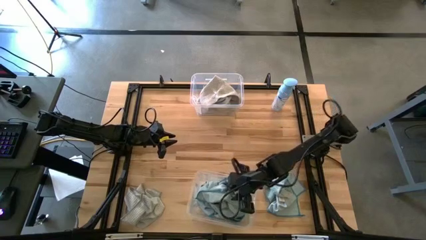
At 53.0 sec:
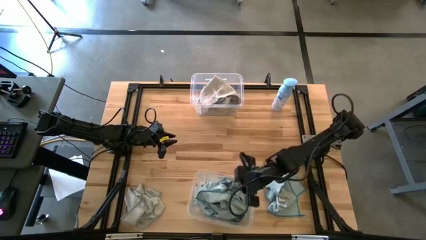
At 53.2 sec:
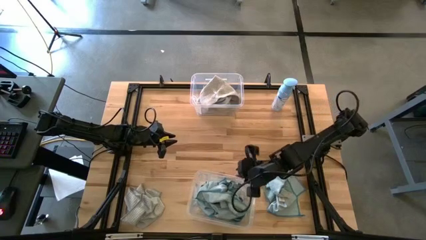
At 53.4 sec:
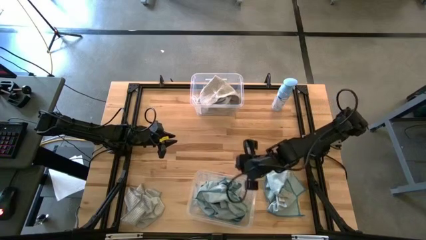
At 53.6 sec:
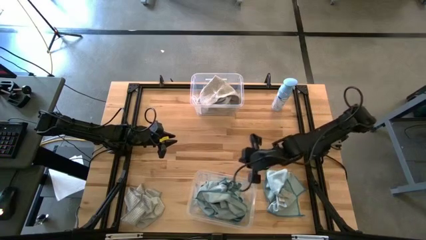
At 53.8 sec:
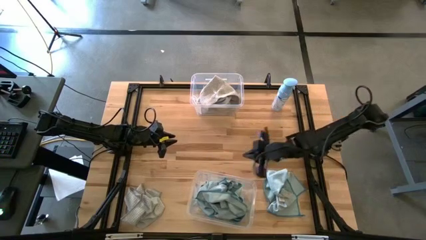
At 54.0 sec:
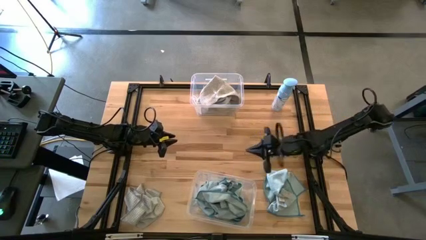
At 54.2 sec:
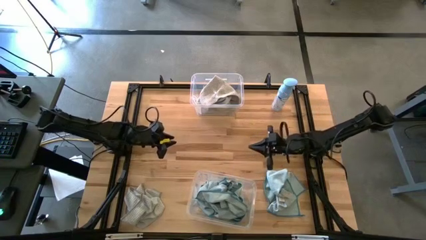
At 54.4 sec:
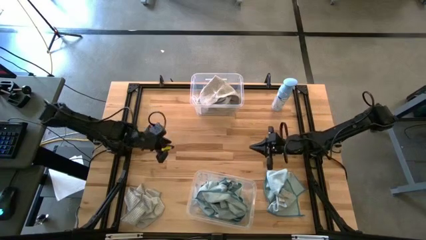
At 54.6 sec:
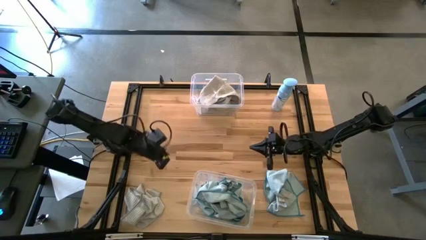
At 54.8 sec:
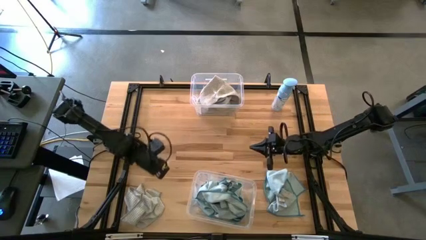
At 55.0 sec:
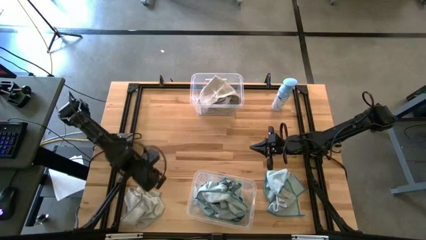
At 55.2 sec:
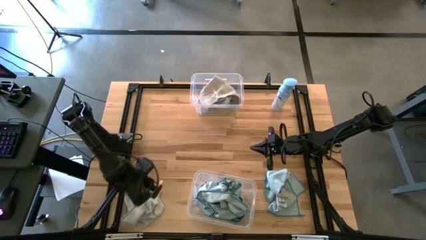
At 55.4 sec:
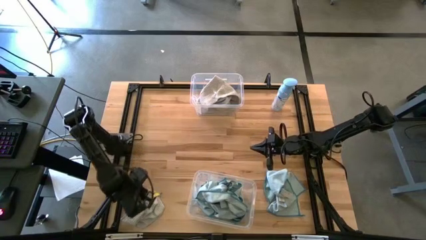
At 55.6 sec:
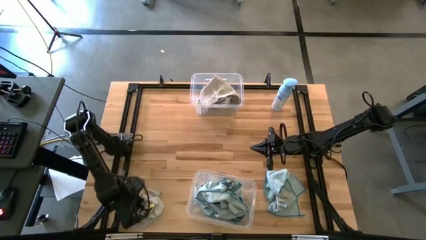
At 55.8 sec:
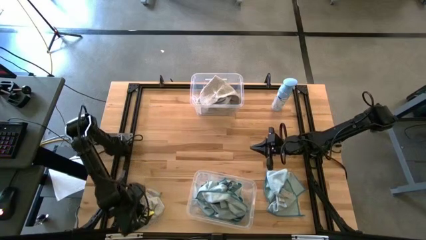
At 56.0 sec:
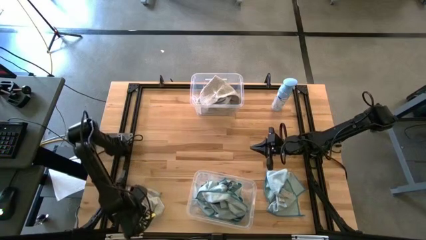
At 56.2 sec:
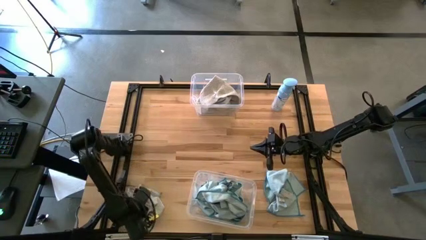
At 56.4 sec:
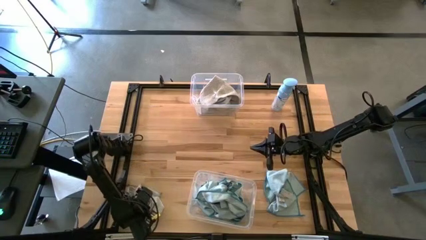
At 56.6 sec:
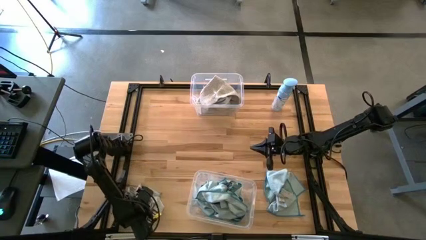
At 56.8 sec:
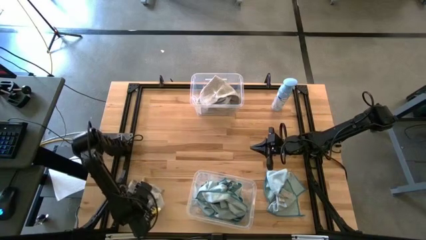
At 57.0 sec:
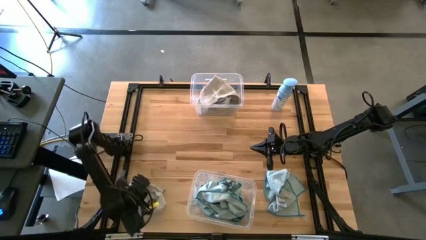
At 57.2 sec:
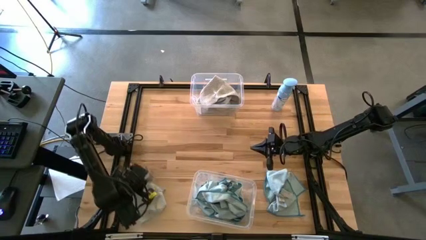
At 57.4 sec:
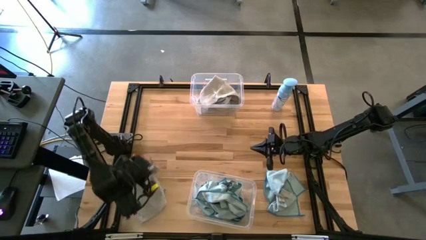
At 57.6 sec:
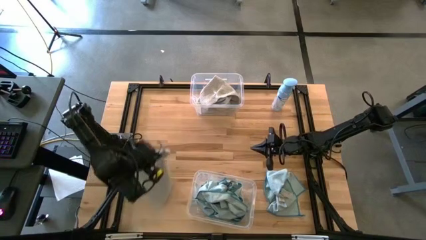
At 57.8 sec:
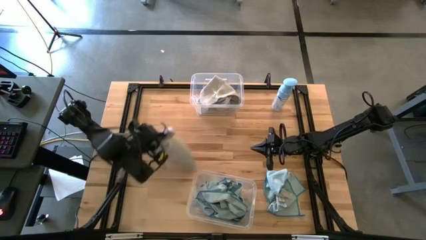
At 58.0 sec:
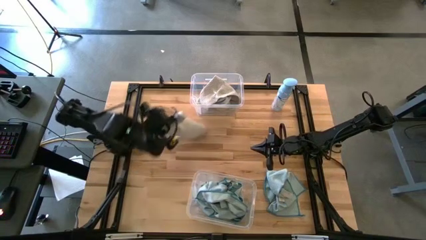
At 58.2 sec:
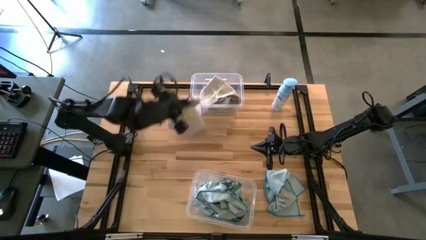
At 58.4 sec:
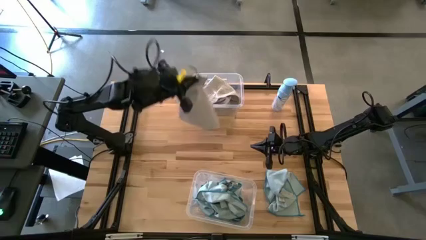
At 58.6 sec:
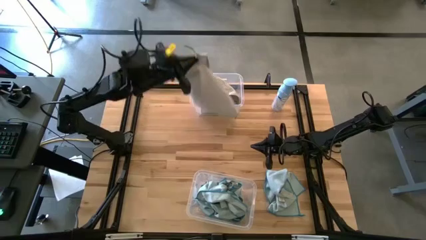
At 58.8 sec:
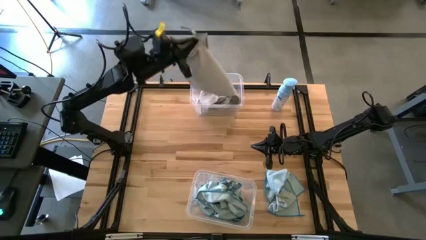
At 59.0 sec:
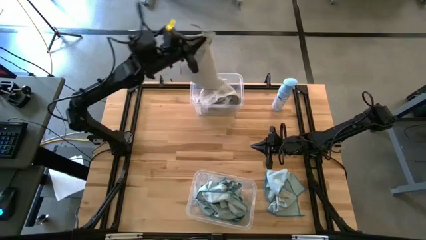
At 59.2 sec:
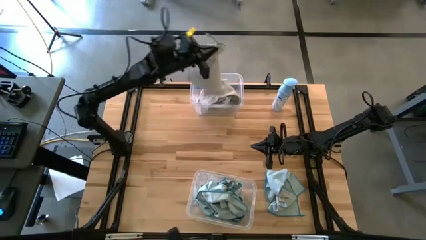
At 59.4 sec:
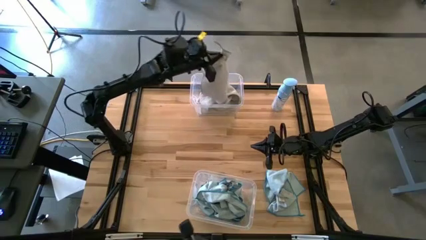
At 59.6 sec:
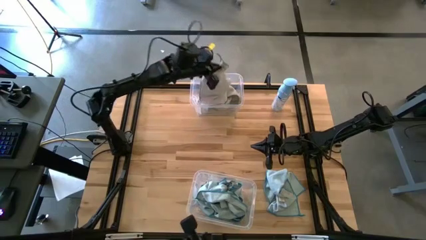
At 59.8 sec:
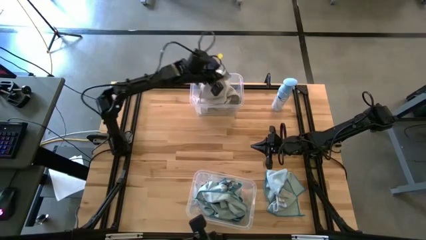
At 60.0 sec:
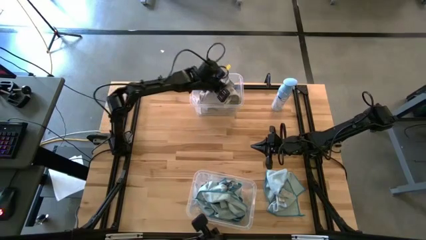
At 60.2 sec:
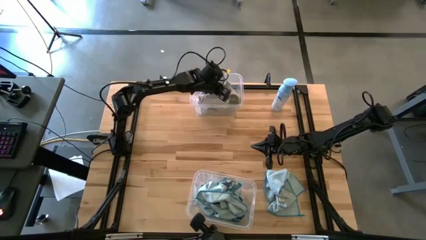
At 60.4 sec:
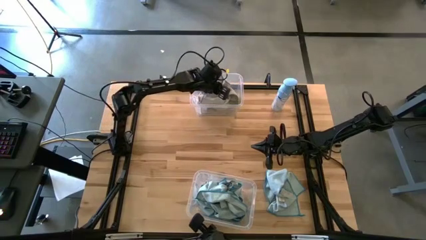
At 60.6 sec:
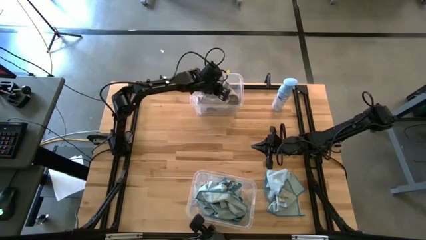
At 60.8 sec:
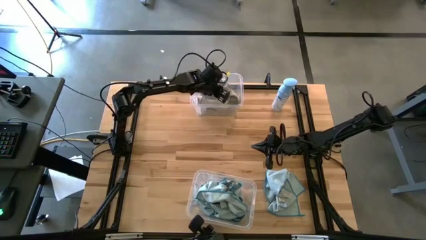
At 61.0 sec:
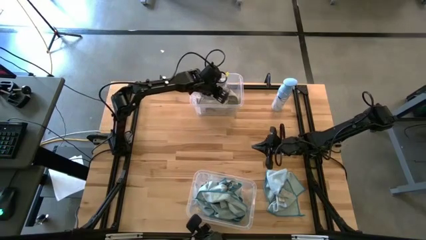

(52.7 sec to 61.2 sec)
Task: Sort microfiber towel by color & place in baskets
Put the white towel into the top transparent bin

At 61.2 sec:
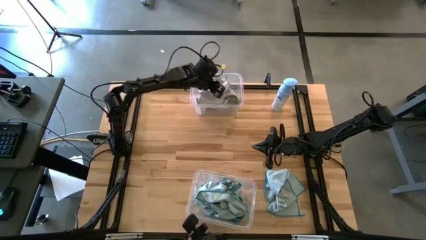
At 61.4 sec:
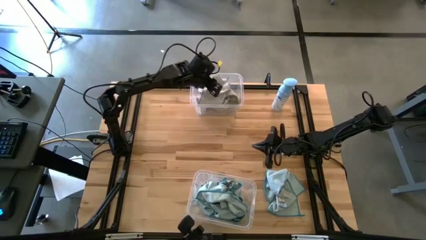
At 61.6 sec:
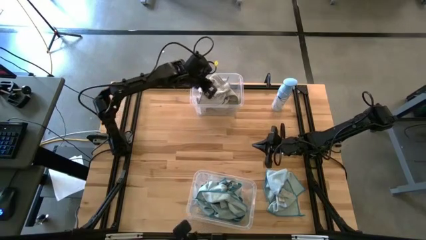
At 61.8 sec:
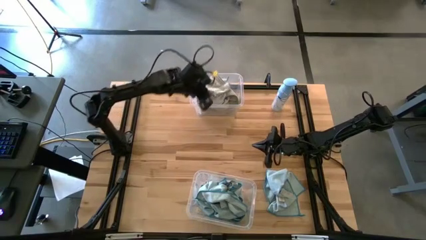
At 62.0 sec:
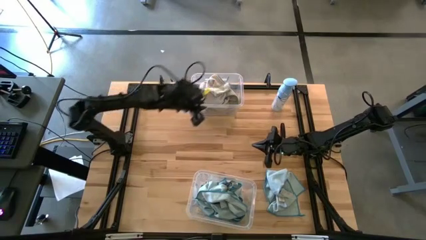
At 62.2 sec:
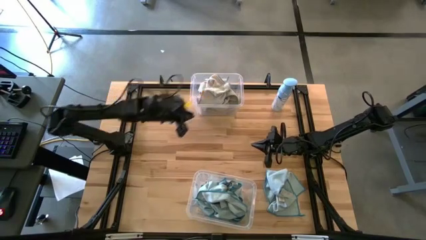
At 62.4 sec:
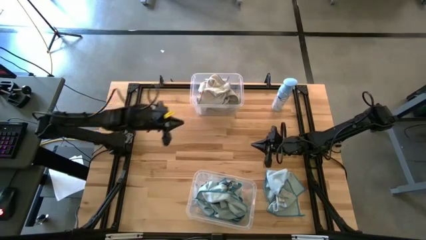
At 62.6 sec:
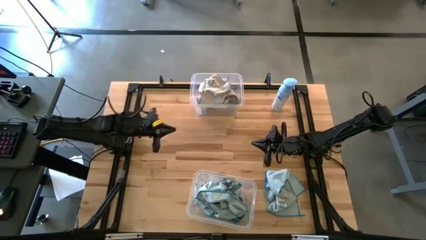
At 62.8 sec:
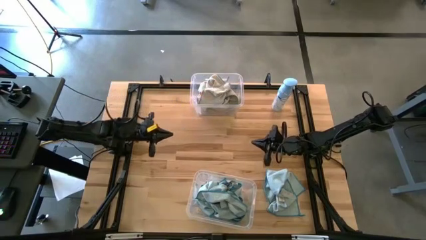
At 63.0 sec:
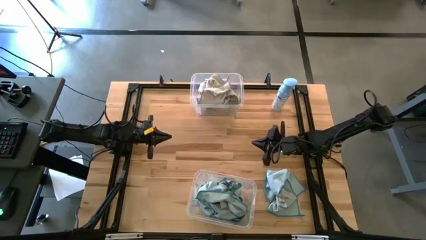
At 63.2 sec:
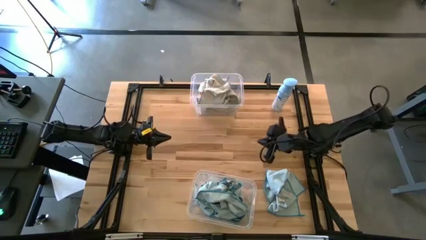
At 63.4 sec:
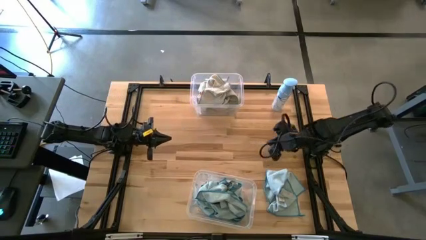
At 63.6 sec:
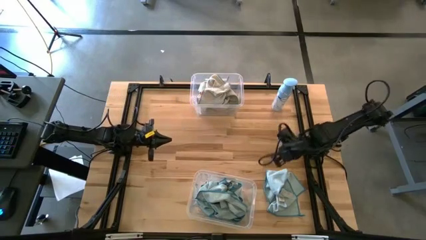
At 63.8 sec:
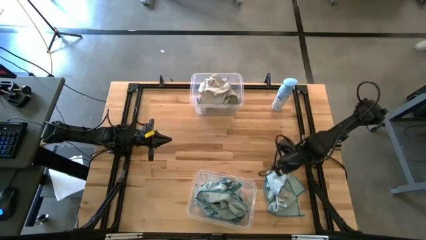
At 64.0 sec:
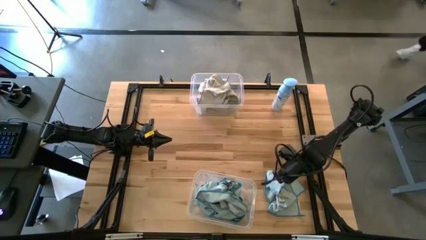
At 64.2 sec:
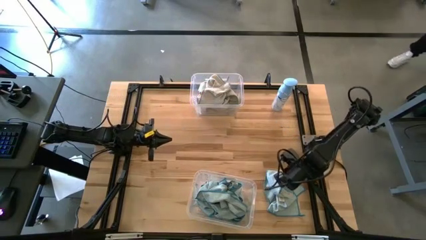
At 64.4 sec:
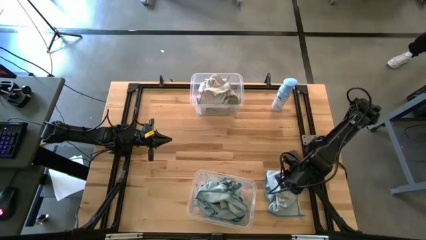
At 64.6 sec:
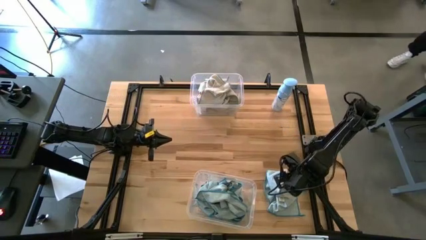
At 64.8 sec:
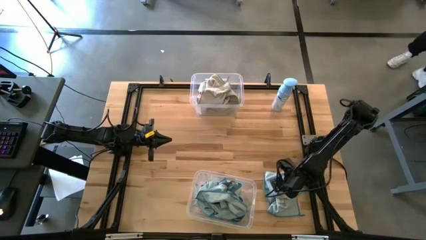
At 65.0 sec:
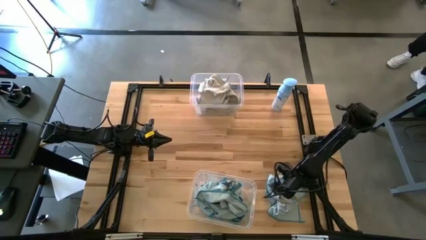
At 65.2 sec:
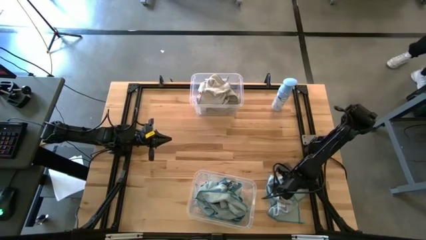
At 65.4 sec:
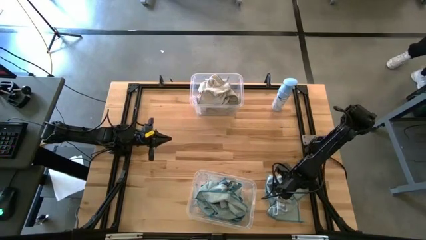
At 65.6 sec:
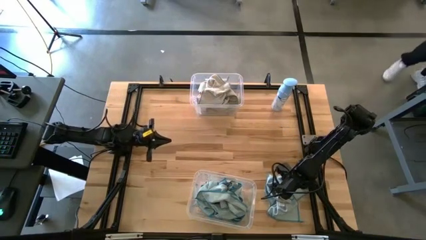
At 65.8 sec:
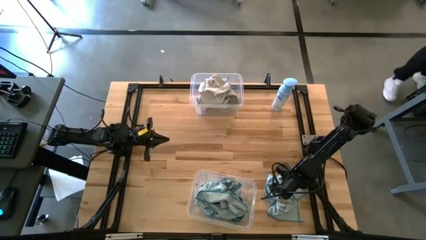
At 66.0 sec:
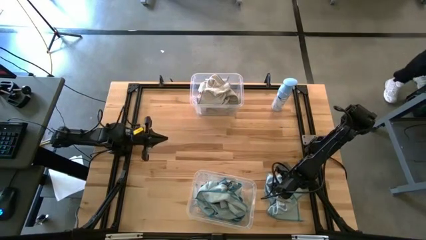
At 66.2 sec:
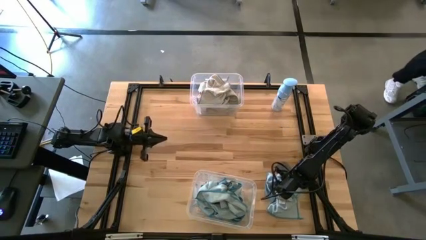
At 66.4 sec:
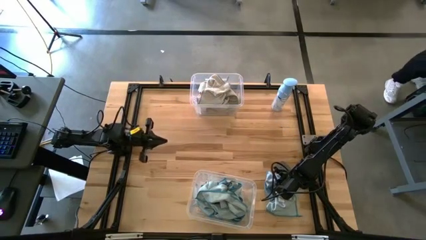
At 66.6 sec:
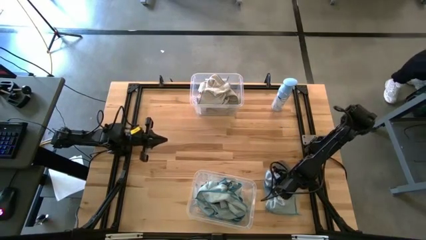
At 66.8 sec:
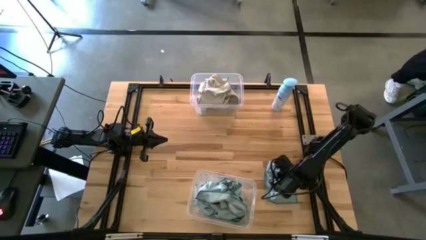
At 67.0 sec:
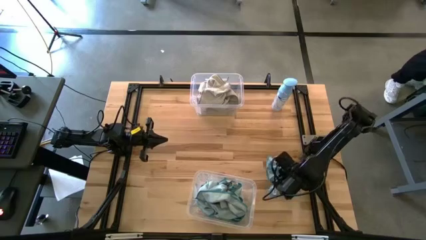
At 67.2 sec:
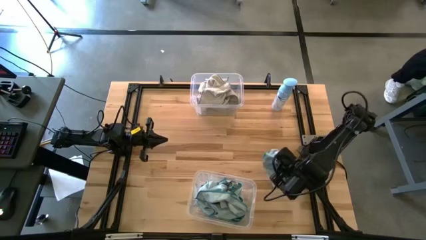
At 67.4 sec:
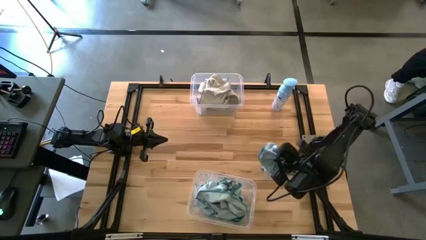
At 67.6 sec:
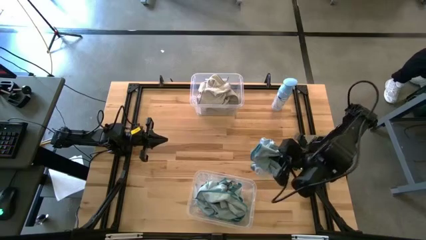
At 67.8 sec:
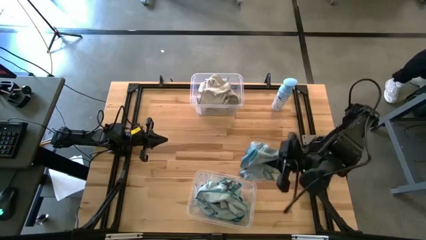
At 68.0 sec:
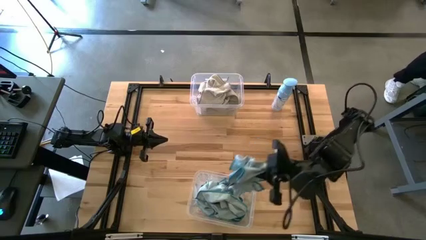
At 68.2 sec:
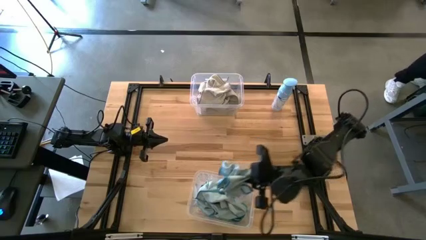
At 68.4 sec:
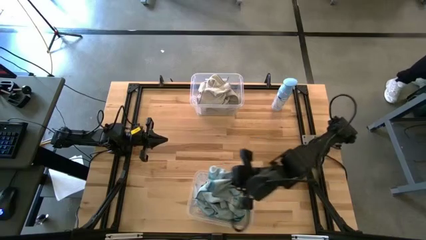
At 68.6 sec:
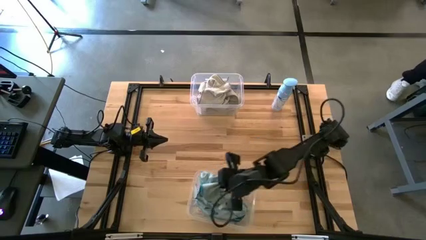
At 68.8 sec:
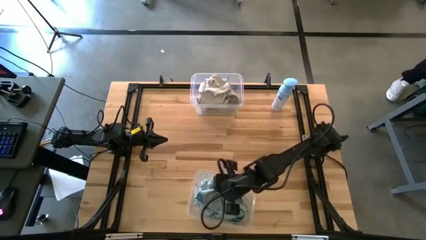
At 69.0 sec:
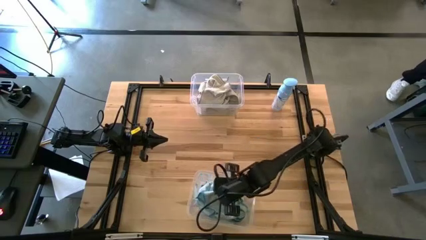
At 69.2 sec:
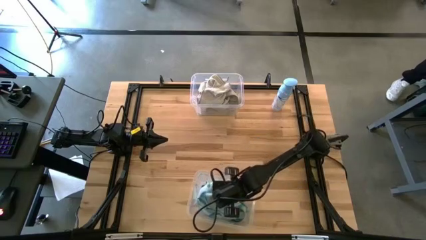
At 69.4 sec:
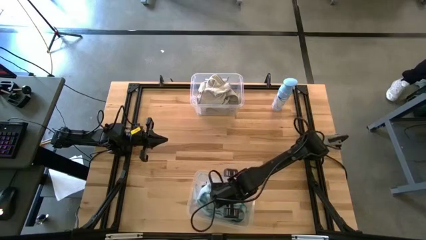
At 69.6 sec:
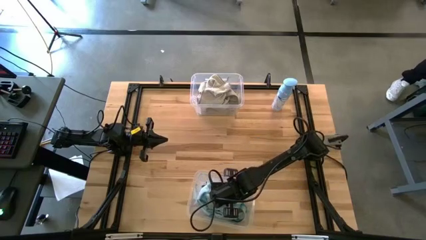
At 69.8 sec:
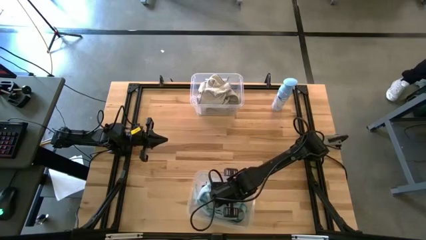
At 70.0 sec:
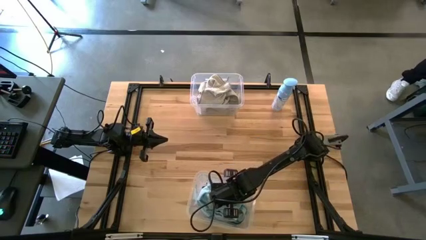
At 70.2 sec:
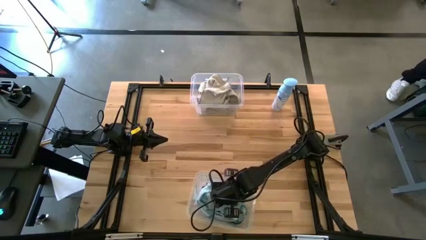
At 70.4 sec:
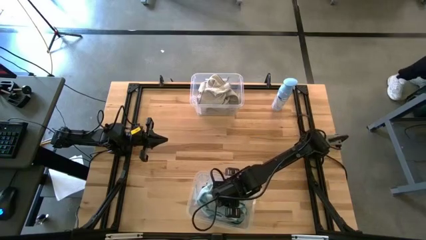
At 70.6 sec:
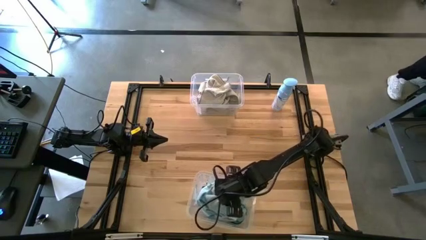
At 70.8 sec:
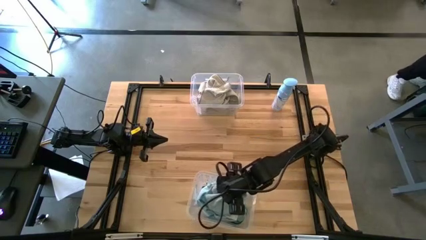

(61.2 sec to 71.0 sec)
Put the blue towel into the bottom transparent bin
